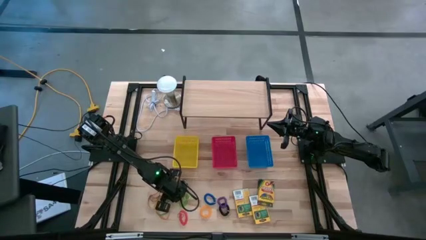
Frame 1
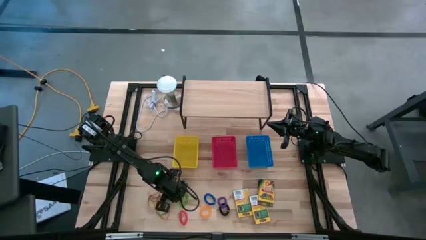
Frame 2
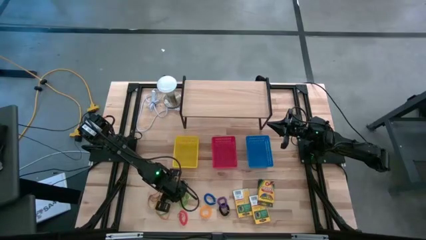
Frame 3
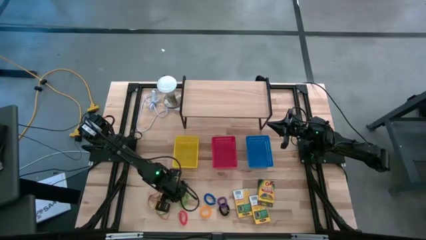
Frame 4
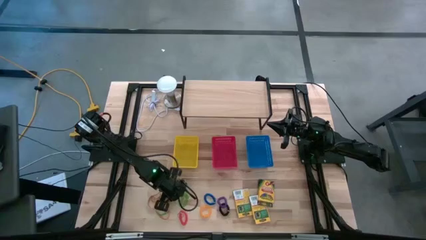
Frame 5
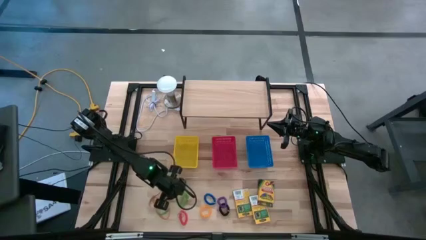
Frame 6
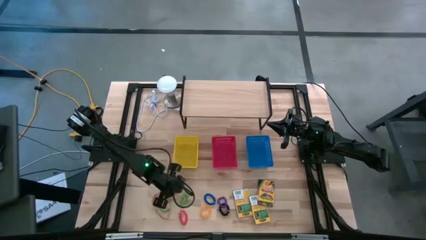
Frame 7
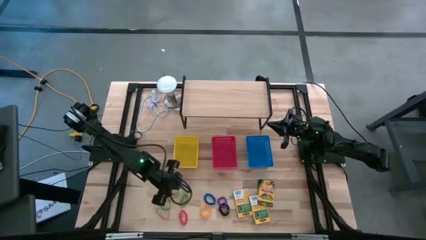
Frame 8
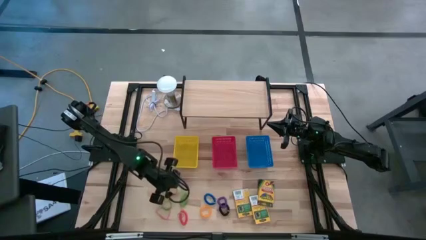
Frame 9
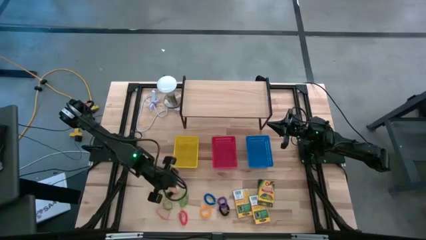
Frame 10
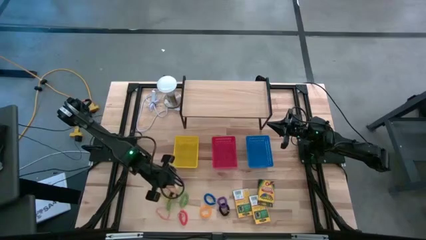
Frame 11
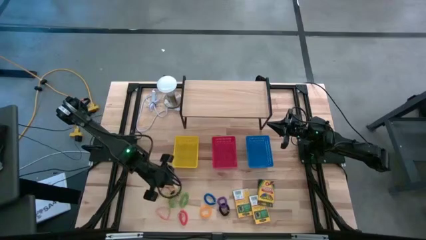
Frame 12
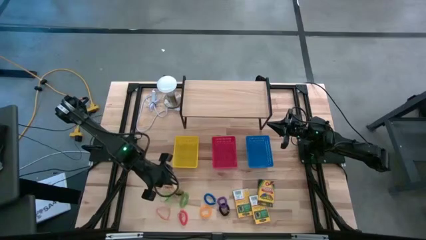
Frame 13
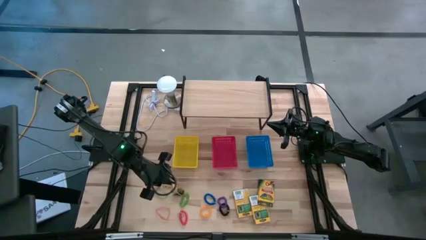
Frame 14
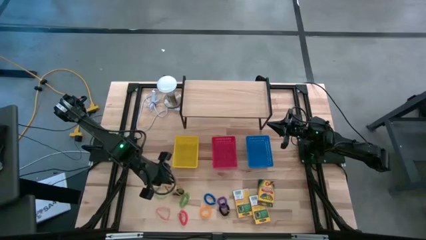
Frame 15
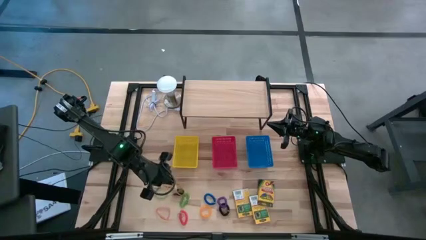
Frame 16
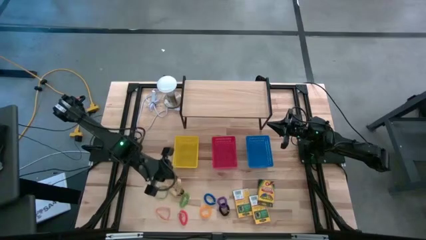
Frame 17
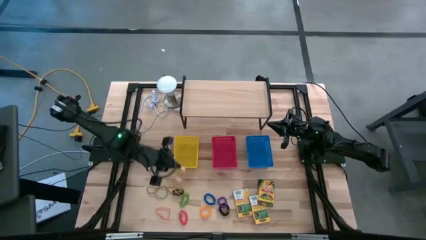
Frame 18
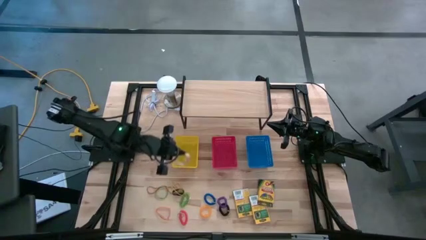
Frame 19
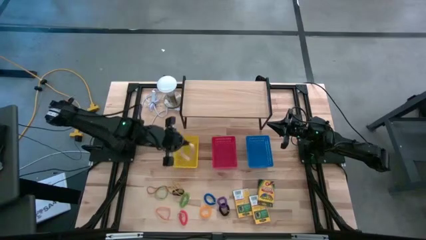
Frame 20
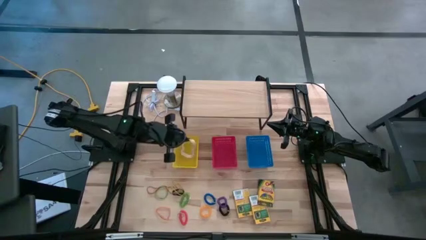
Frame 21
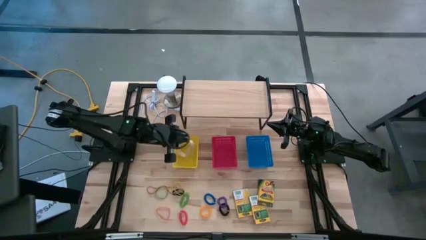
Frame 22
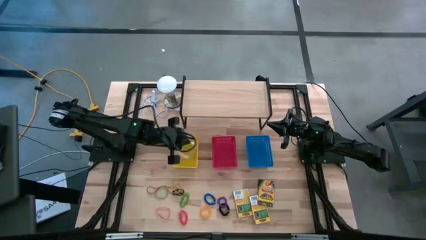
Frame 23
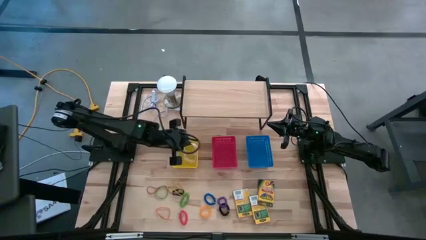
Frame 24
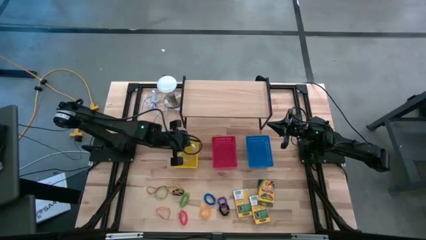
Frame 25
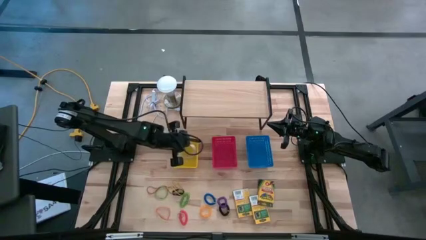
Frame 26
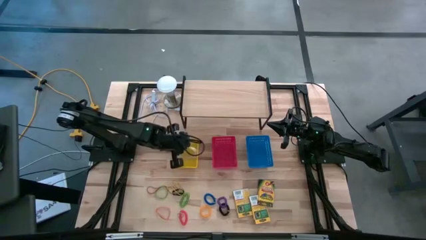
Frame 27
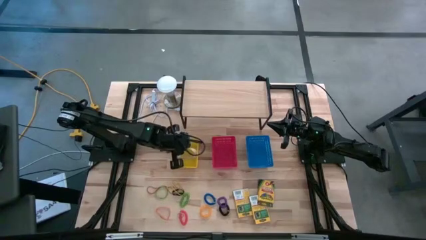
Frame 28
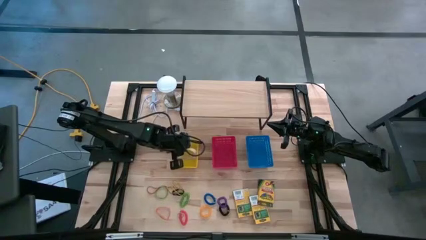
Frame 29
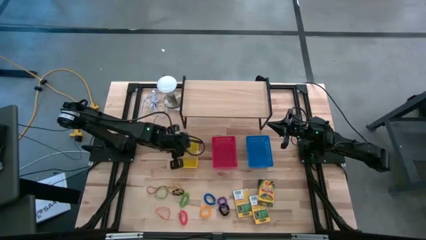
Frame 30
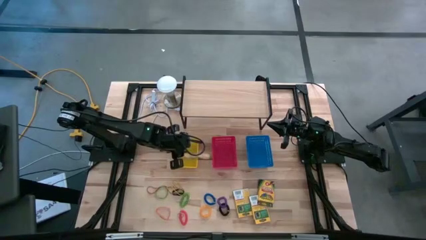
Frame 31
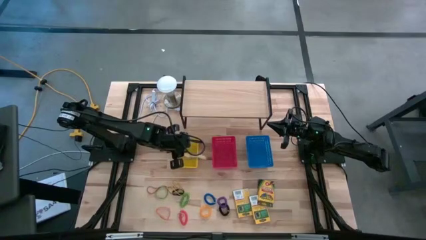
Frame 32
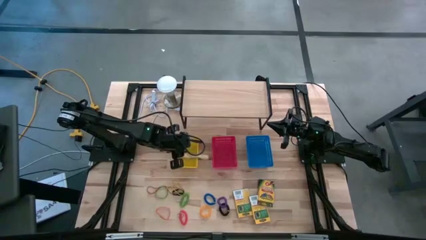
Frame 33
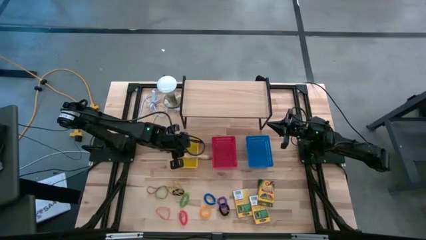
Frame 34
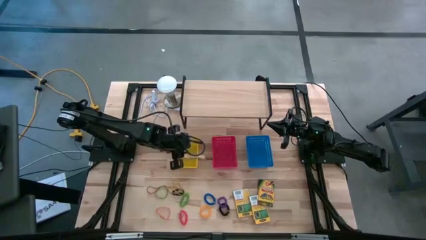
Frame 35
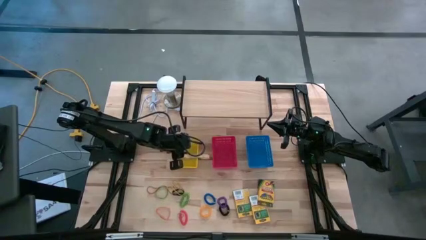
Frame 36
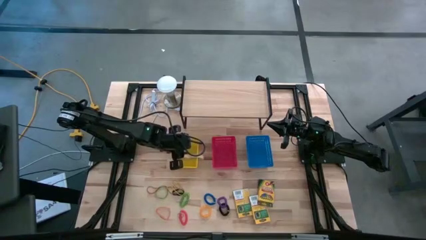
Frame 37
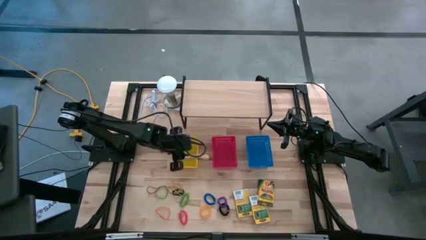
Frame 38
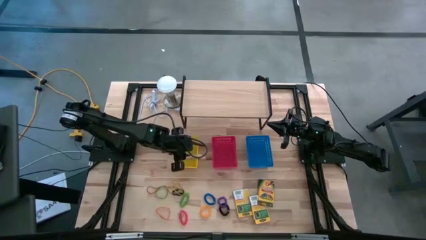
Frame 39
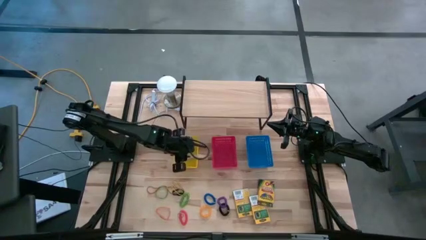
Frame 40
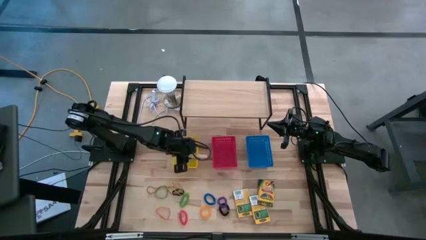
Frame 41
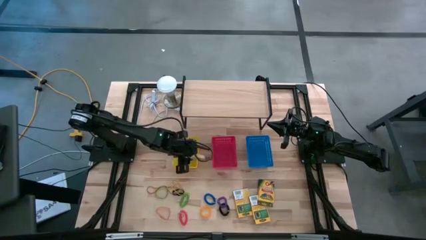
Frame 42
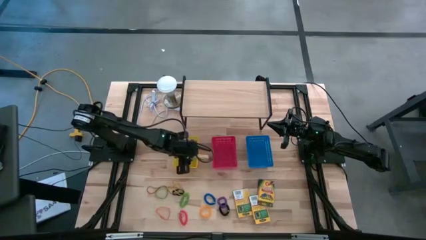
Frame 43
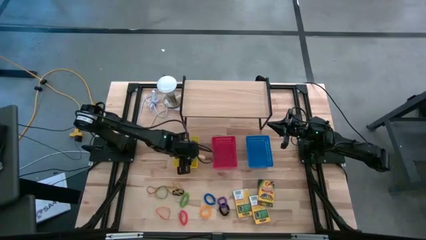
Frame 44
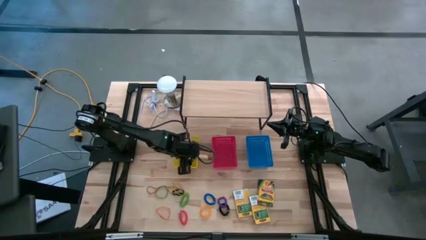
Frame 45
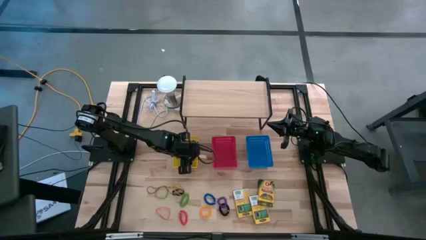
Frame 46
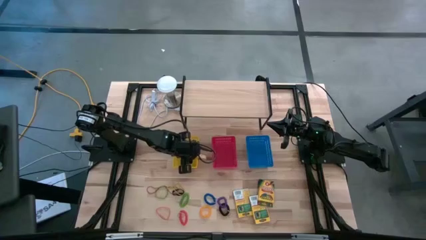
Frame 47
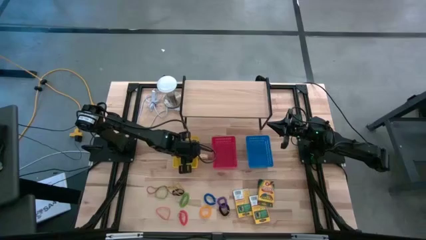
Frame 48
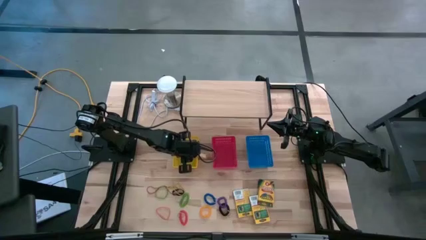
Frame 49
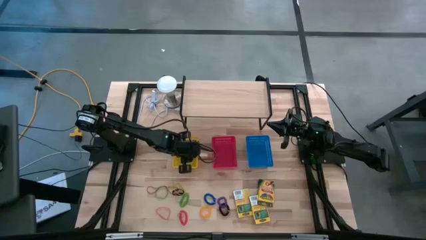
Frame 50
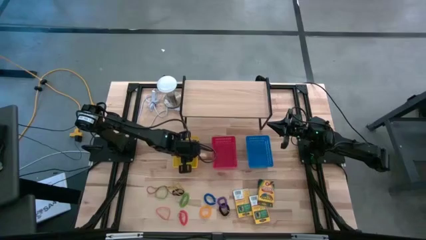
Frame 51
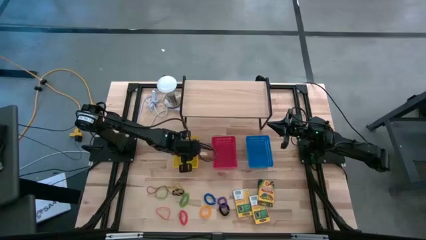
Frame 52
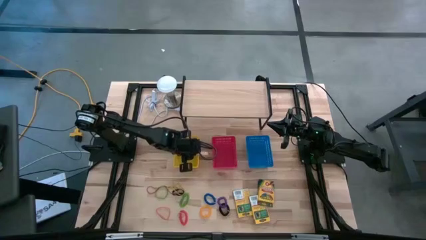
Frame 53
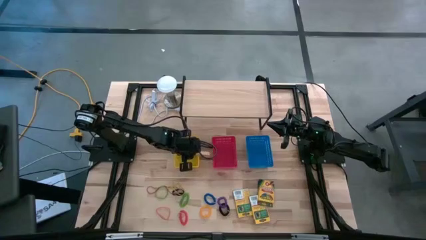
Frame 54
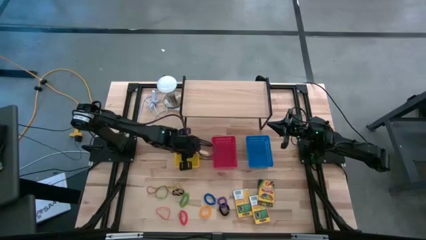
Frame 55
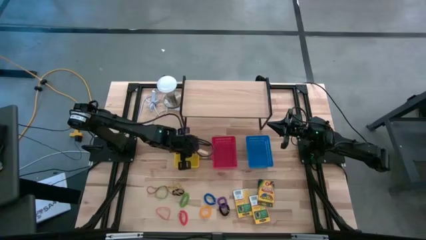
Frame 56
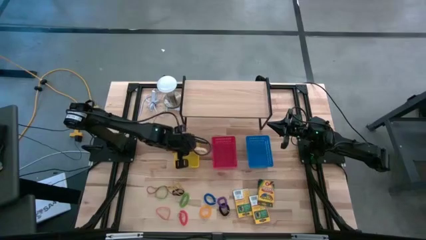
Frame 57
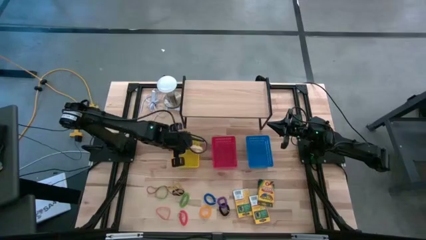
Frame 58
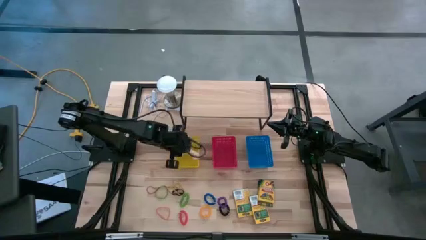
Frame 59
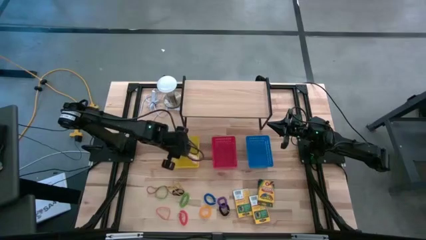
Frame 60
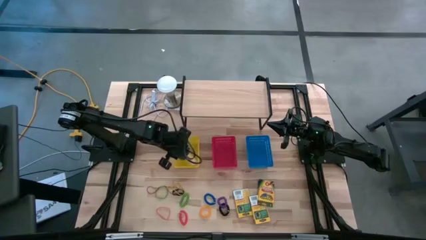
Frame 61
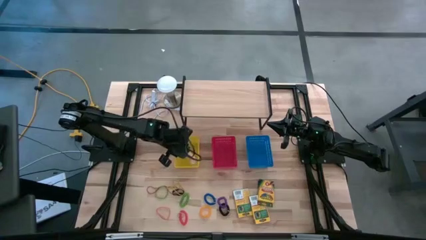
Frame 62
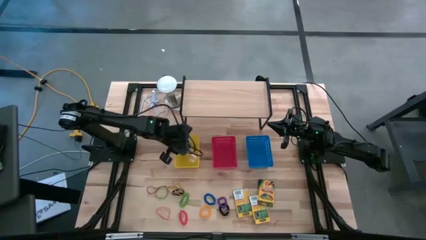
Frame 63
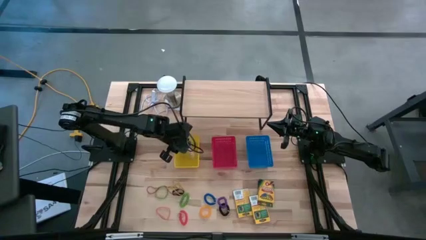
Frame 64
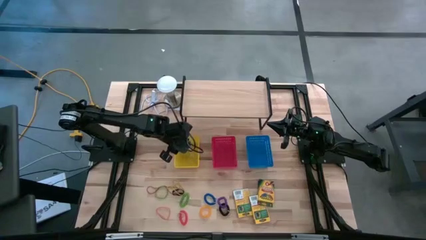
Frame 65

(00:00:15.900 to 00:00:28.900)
Task: Pick & Place Office Desk Supplies
Put the white rubber band into the yellow bin
